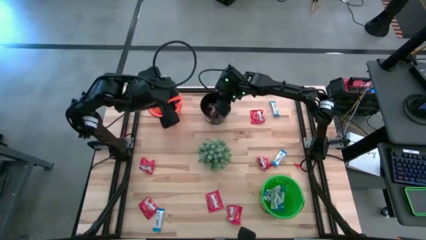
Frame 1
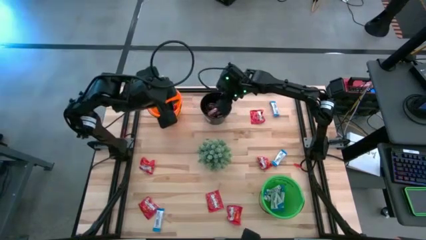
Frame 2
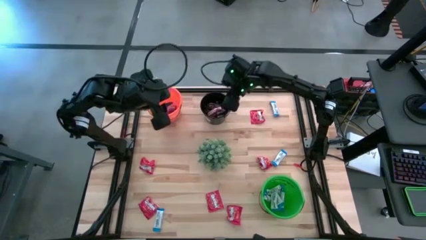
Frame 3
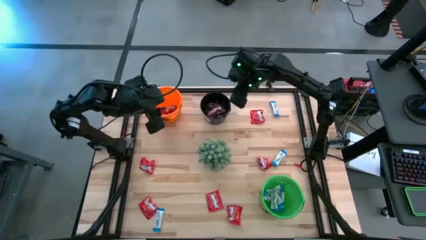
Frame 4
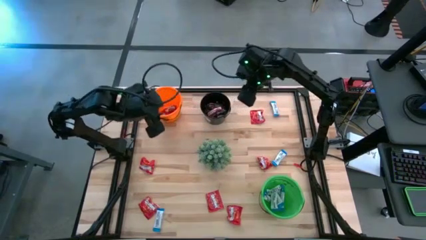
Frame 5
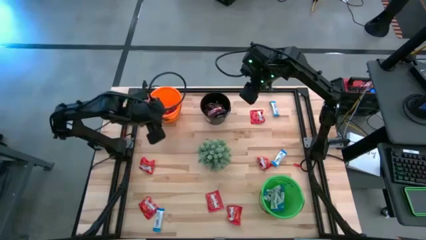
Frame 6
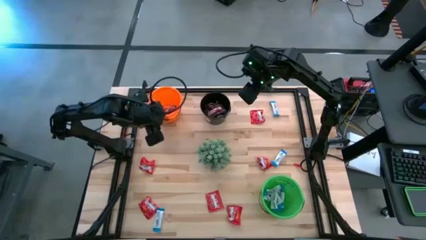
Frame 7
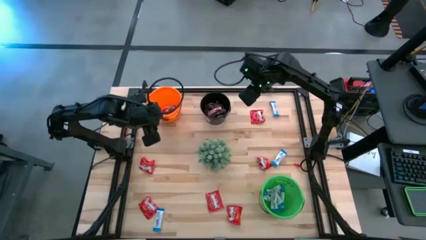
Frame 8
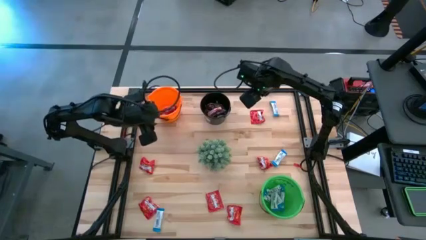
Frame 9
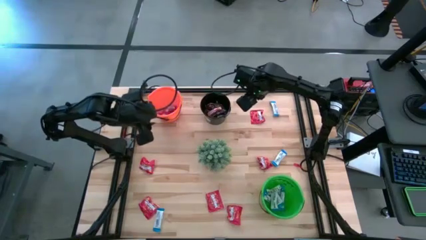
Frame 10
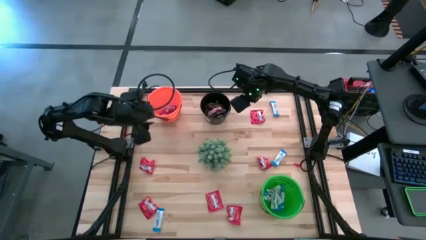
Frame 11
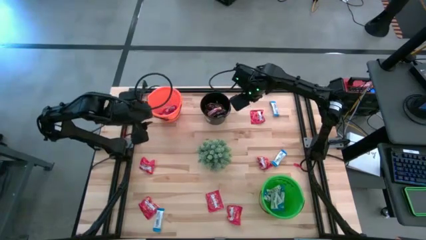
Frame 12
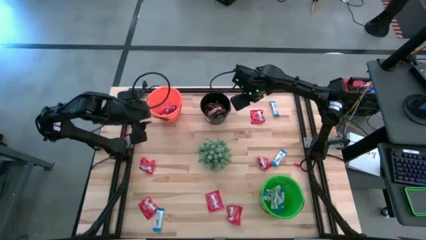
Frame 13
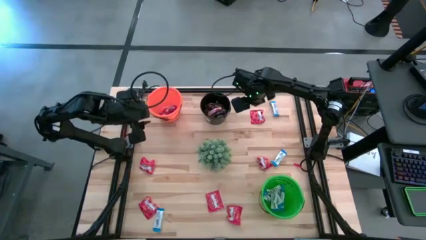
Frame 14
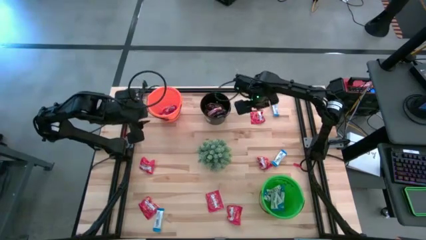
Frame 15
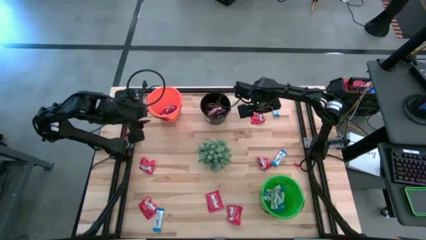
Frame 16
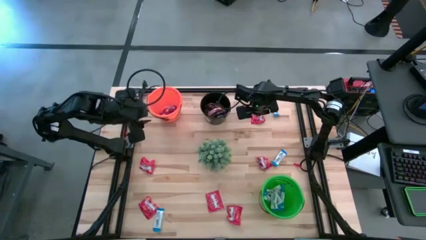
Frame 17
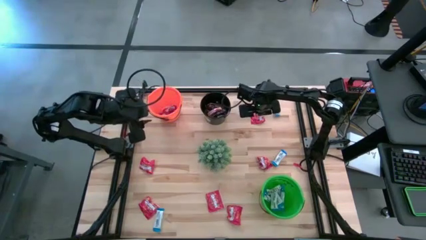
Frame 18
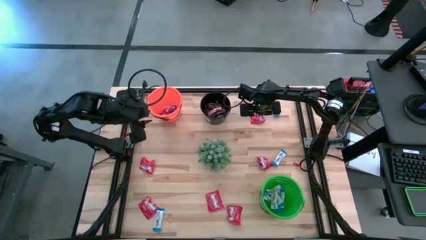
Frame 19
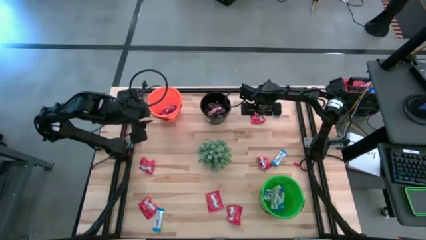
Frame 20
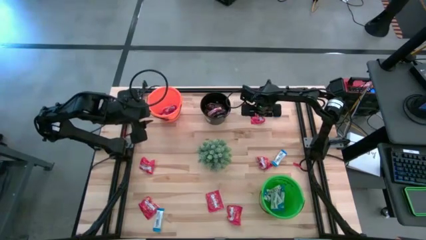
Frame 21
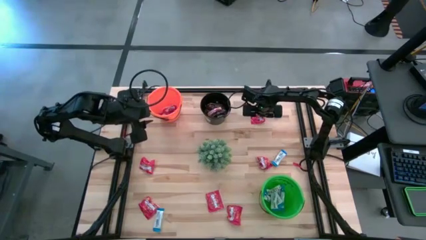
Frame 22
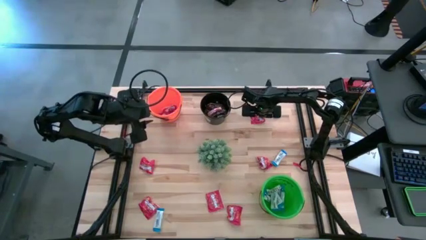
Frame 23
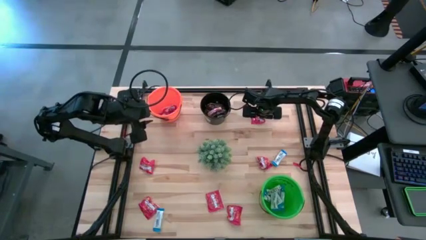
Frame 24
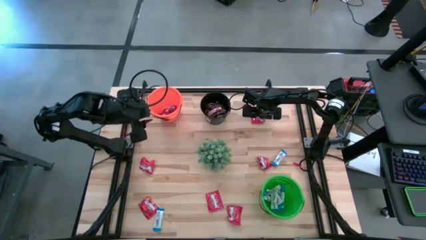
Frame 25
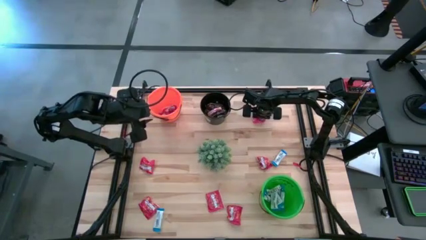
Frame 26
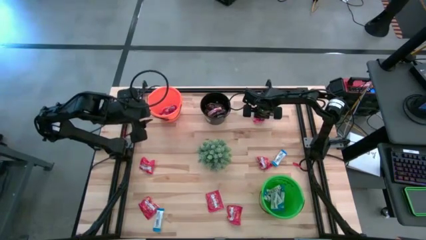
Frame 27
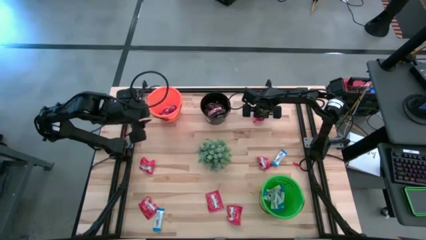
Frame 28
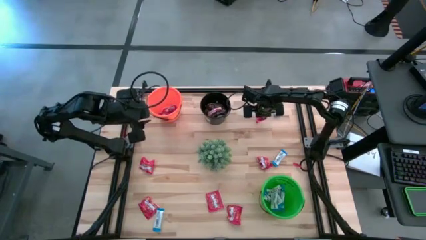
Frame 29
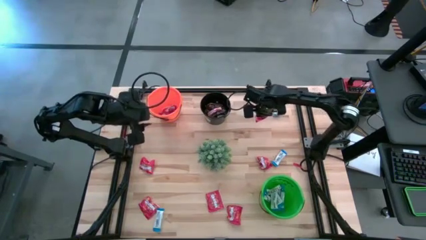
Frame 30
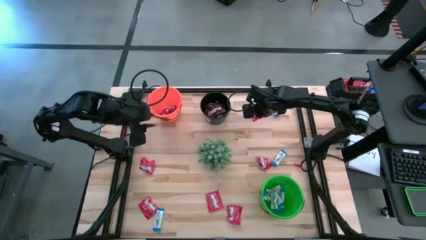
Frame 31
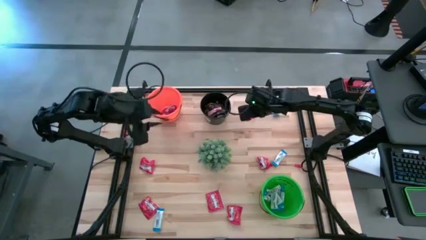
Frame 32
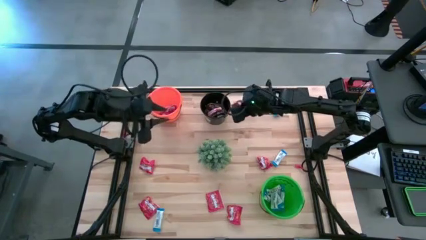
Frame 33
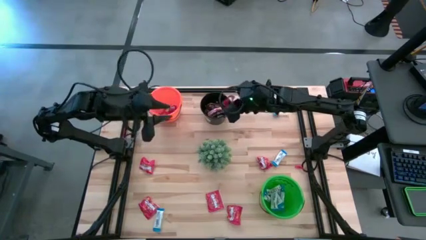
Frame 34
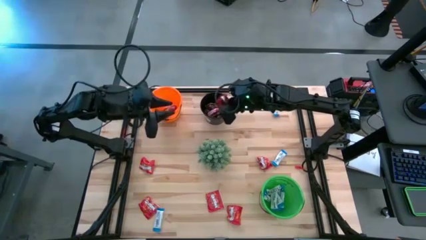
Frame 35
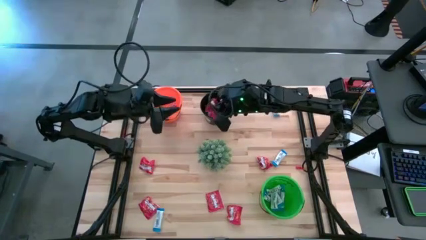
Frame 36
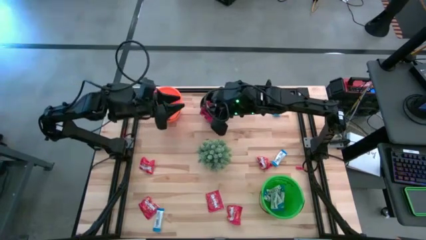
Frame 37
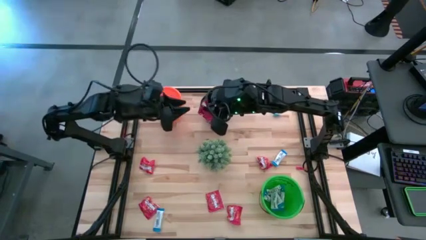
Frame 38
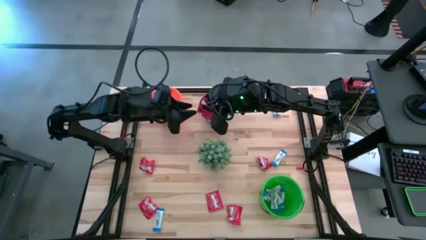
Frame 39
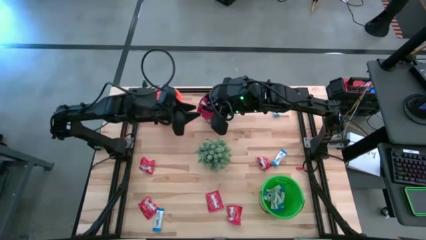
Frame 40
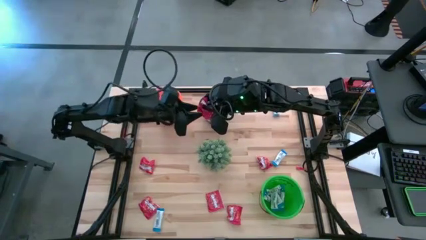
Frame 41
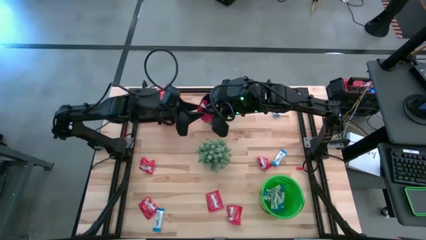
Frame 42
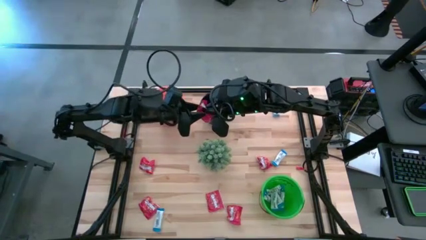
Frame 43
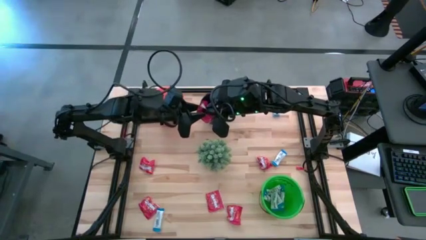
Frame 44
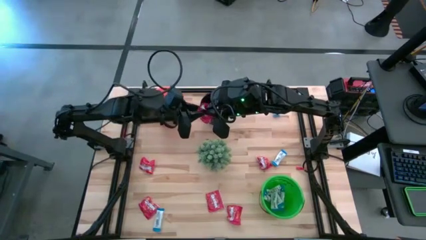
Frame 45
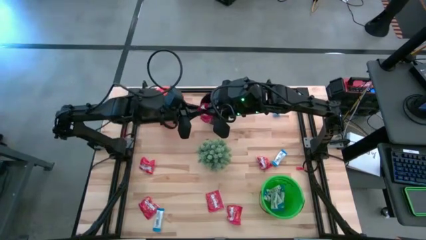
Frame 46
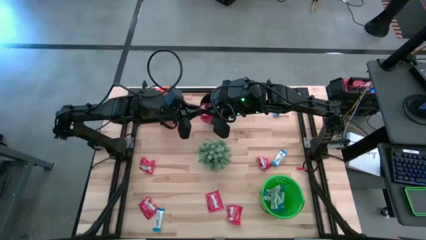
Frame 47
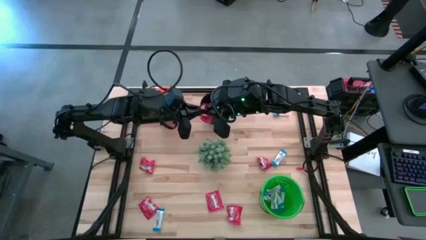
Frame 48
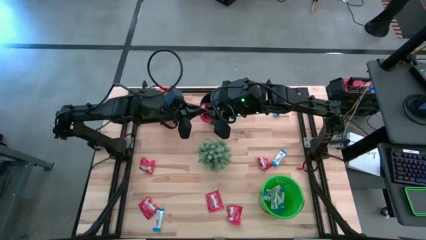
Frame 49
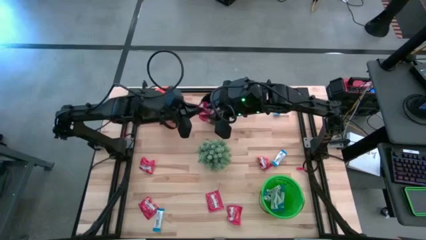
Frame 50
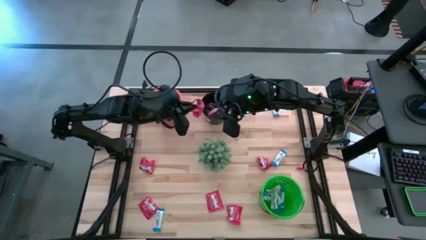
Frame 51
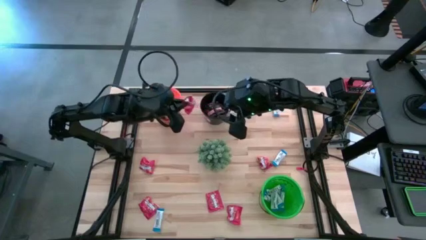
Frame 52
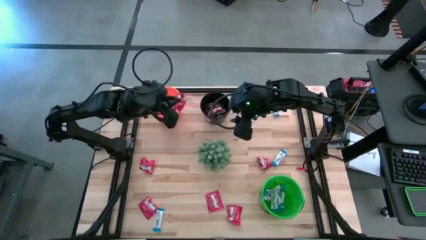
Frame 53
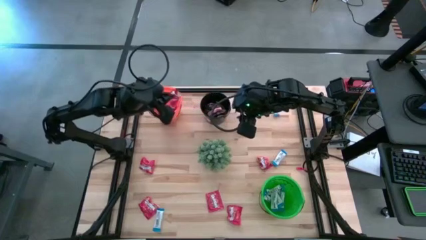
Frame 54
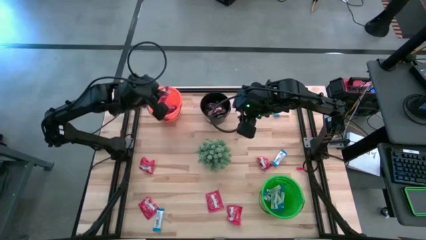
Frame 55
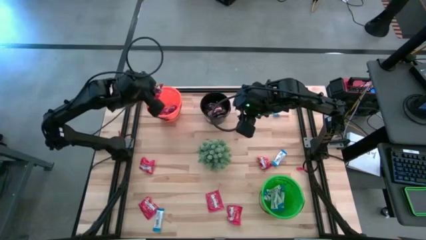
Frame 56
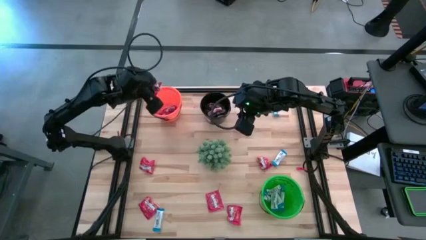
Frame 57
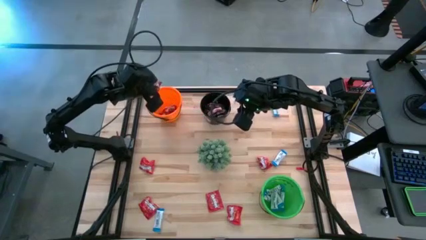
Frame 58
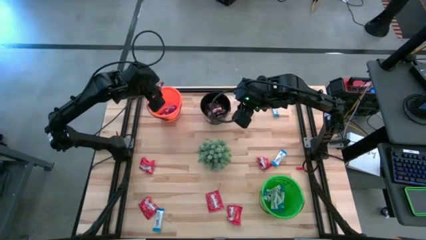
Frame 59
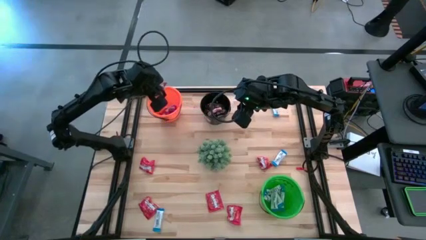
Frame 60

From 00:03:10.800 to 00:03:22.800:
Task: Sort candy
Put the red candy into the orange bucket

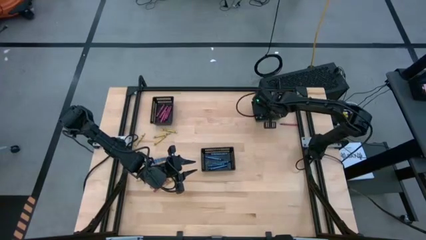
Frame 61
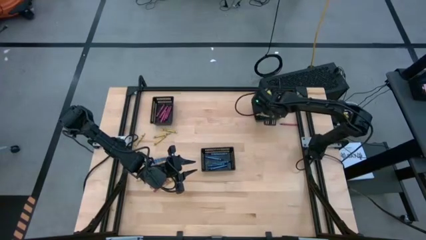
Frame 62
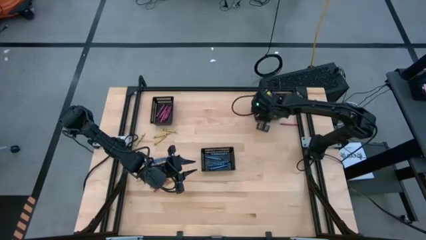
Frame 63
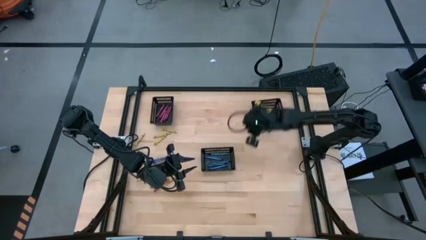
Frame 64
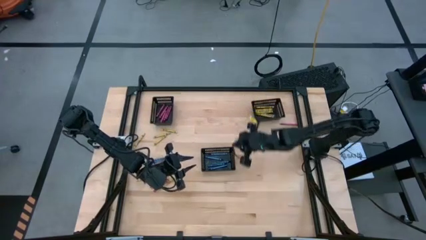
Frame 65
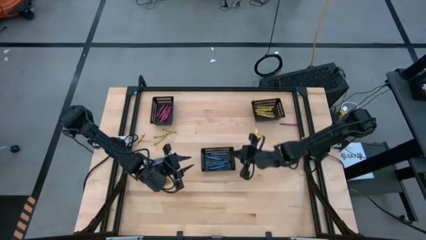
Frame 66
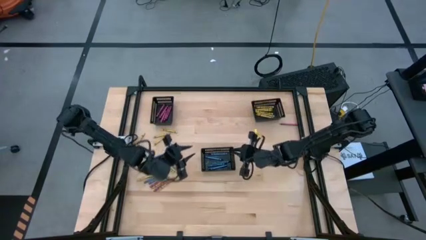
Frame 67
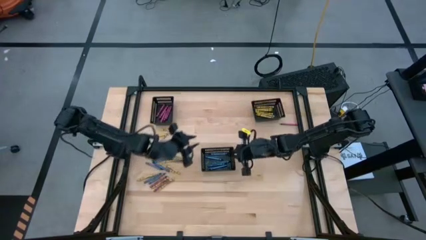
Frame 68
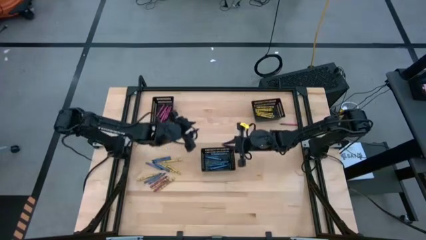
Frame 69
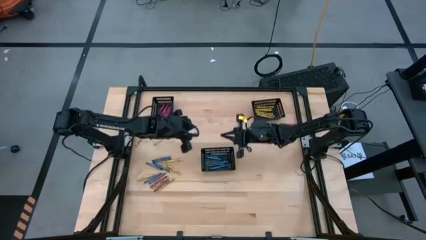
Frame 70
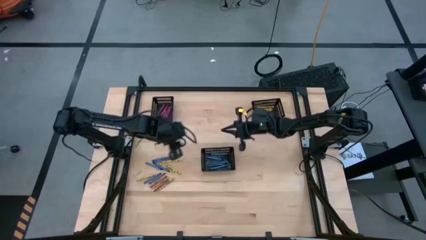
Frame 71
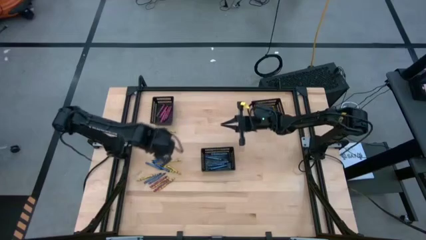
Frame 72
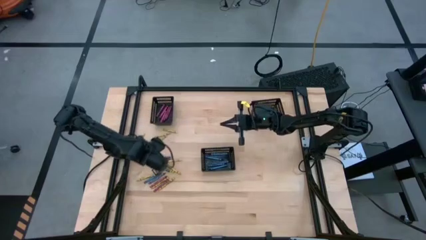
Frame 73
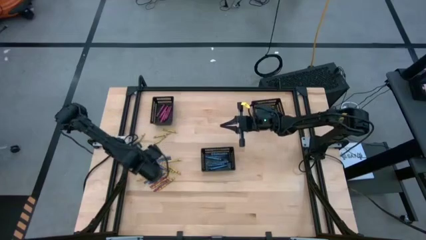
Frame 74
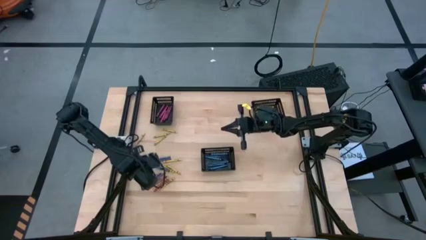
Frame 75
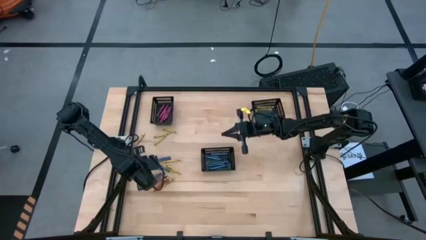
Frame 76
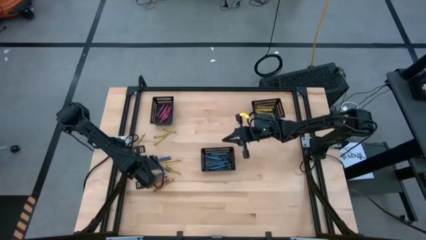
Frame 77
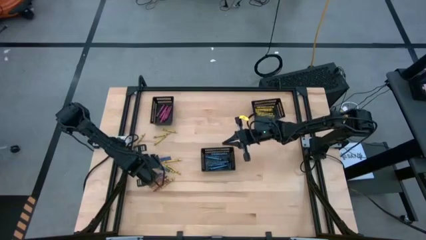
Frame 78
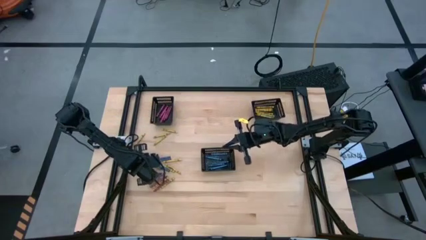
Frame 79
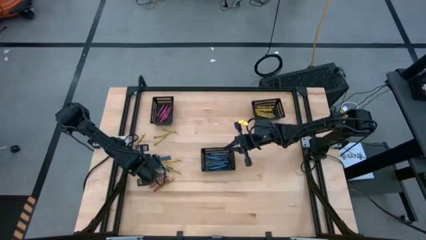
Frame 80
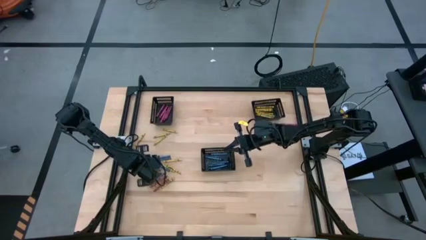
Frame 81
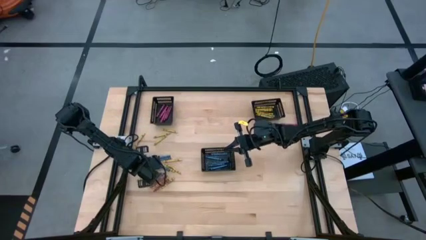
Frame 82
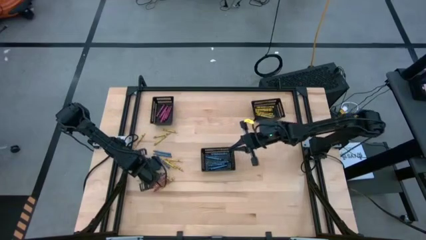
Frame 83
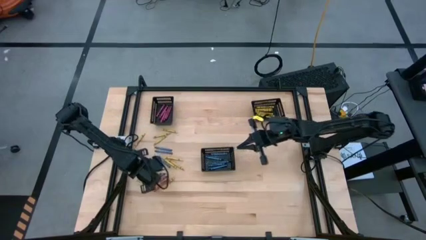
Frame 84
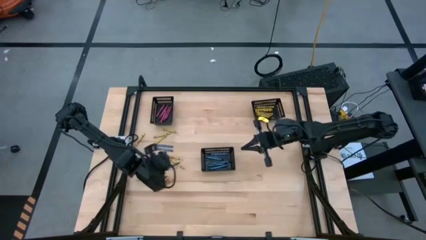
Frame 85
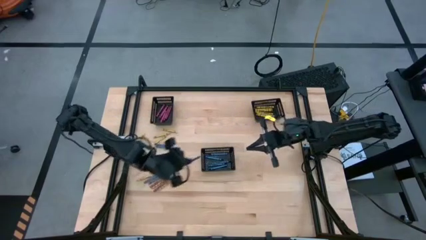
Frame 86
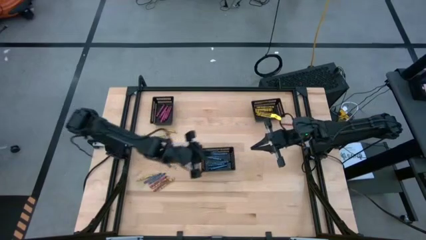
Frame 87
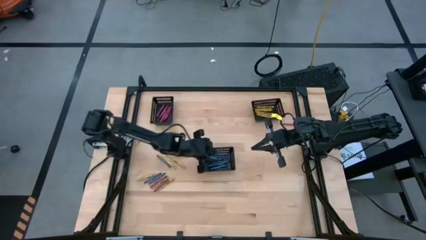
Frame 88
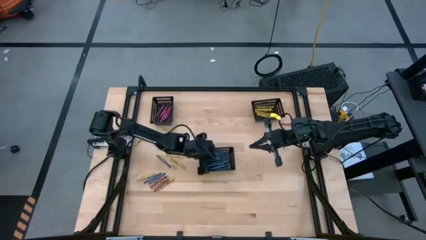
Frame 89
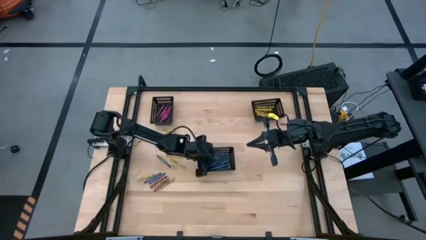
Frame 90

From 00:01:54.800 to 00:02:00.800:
Task: Sort crayons
Put the blue crayon into the bottom black bin
